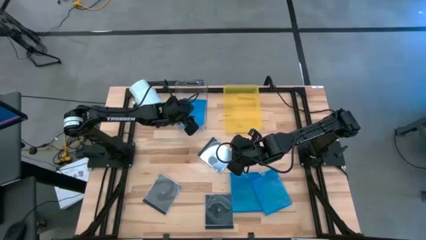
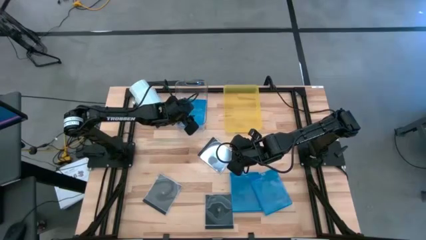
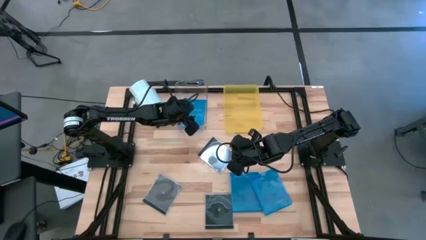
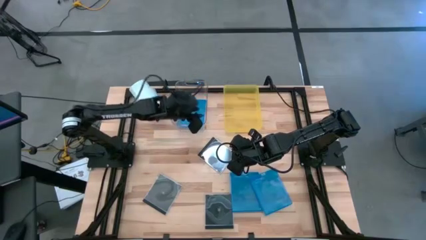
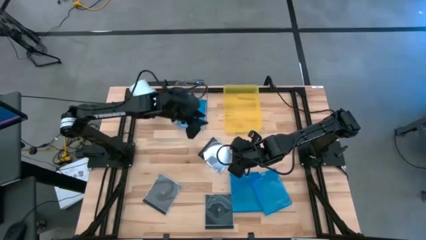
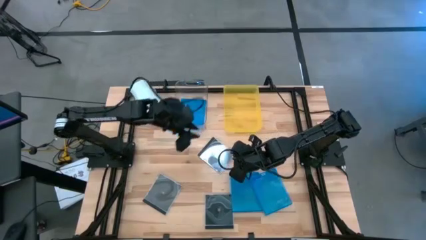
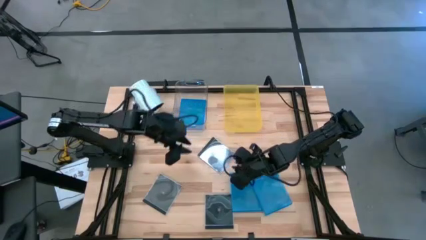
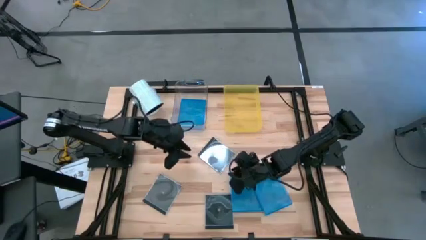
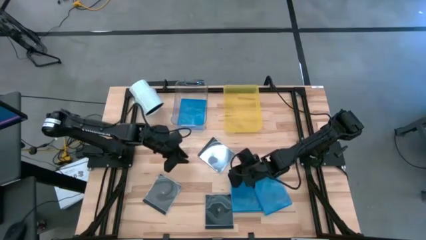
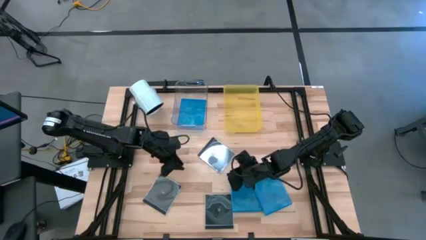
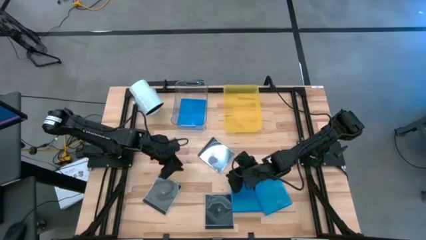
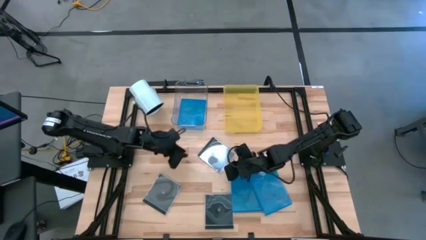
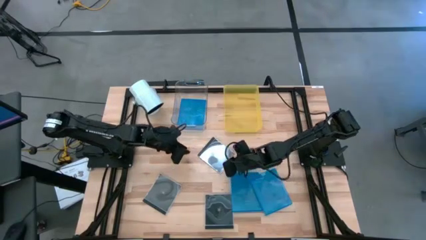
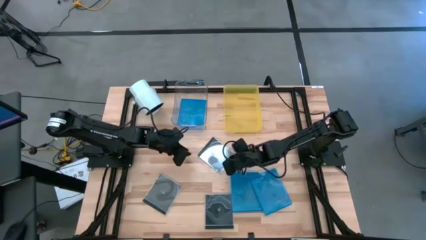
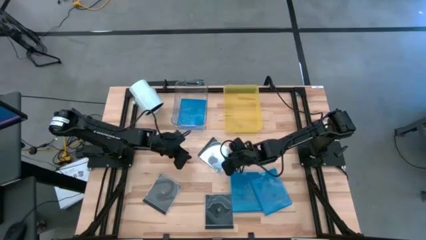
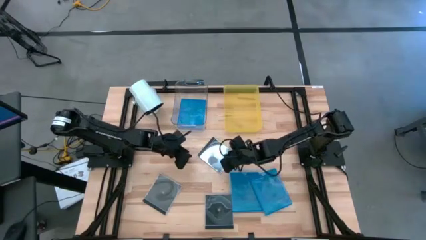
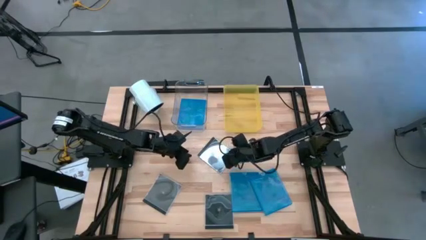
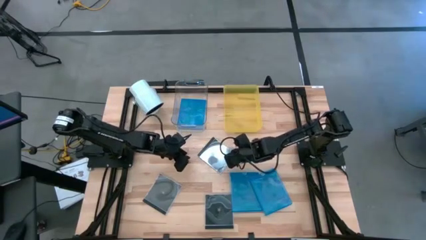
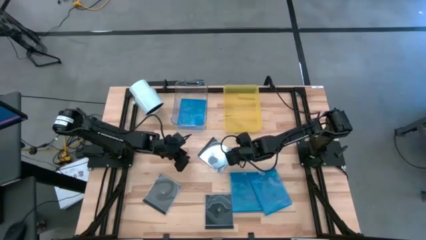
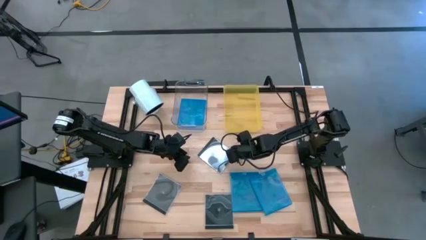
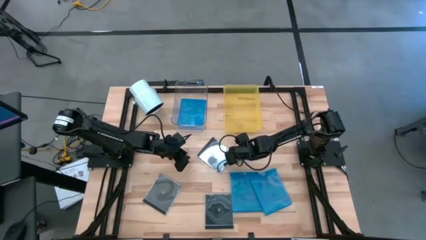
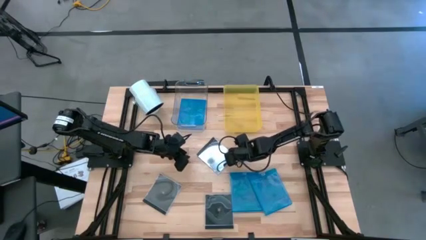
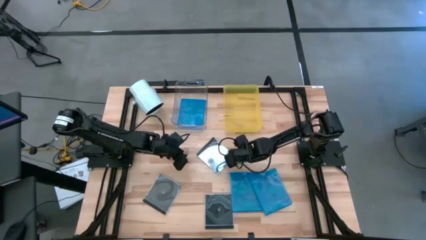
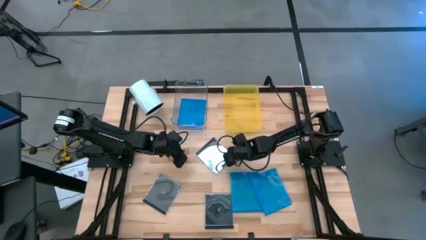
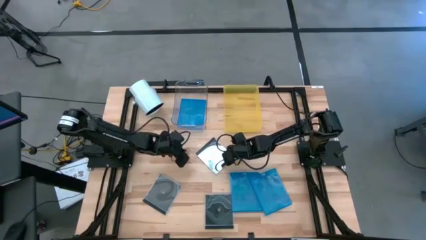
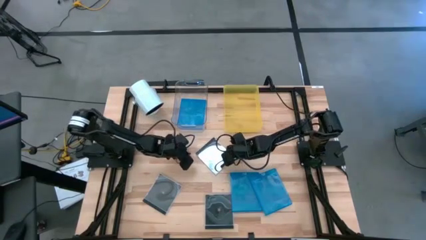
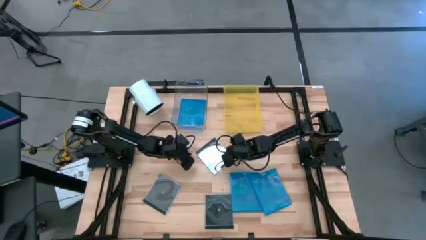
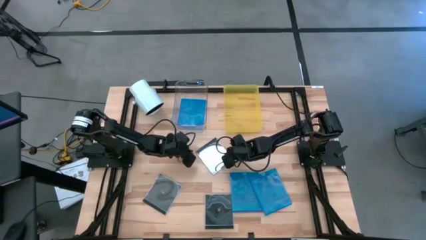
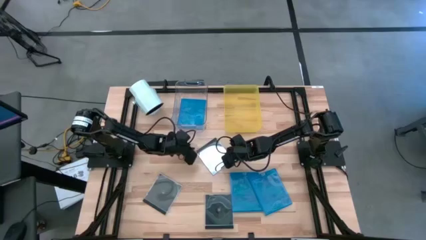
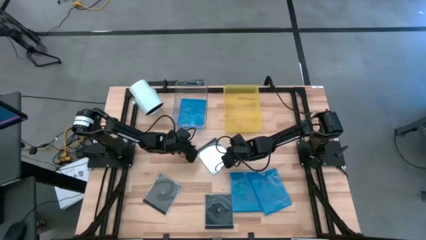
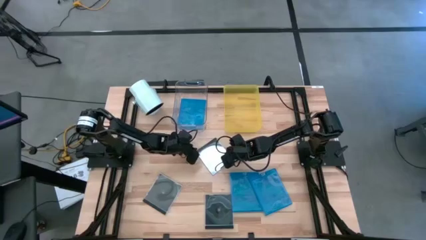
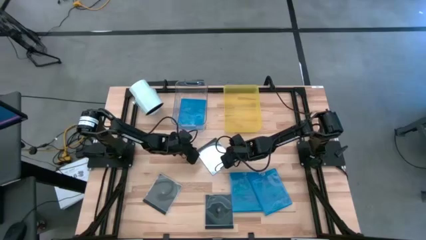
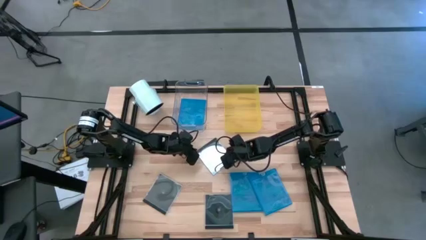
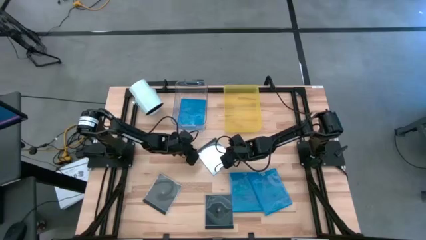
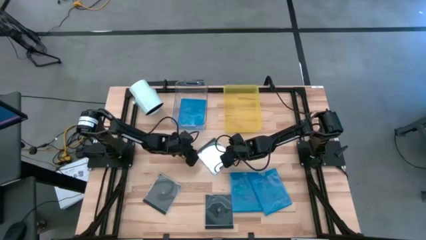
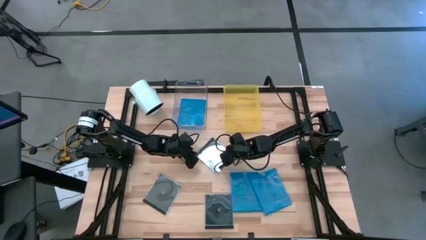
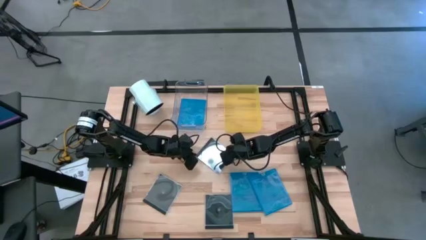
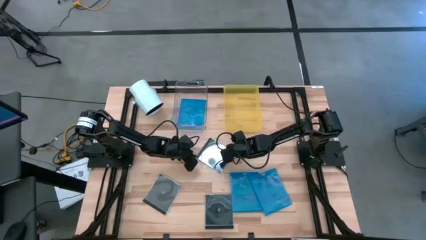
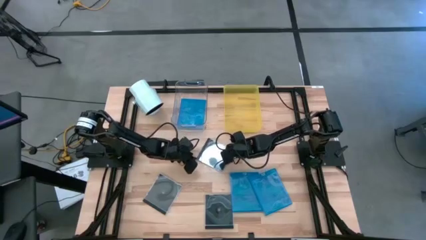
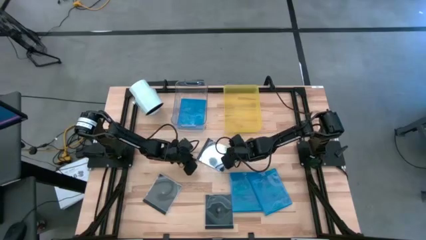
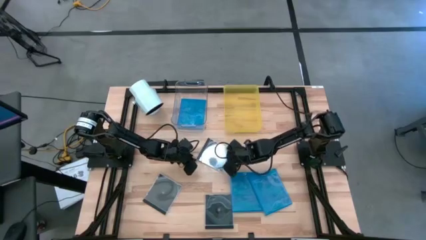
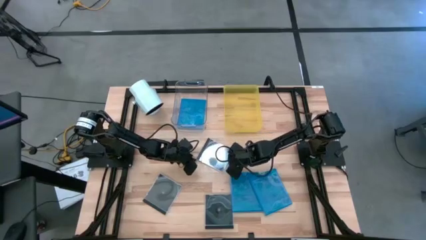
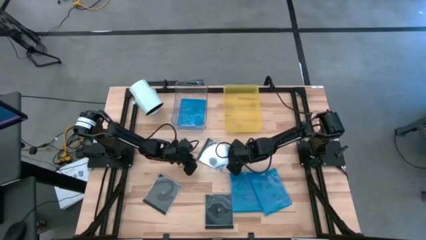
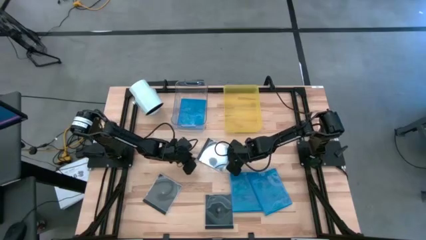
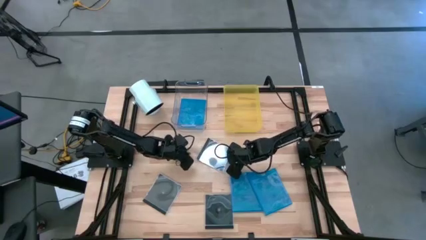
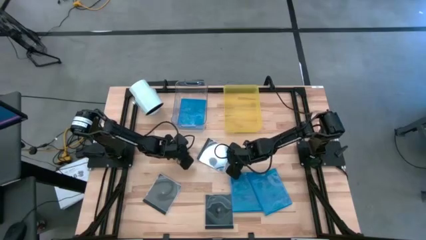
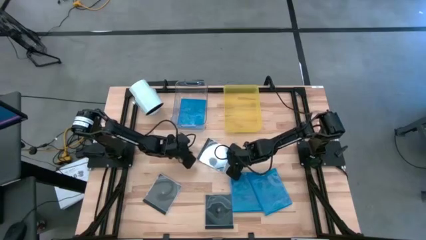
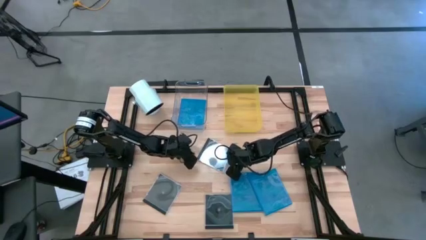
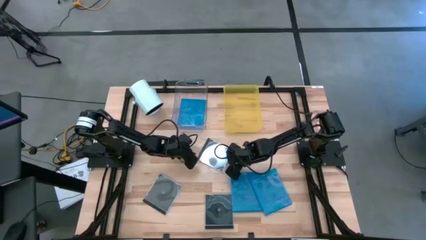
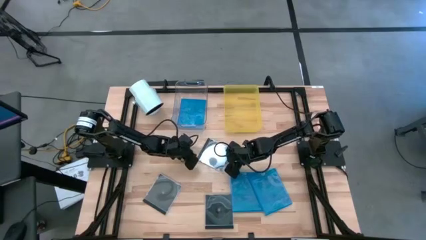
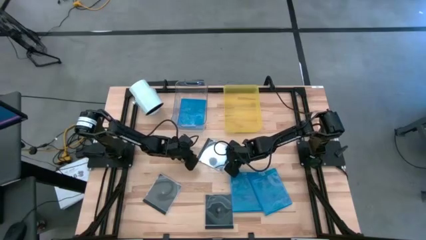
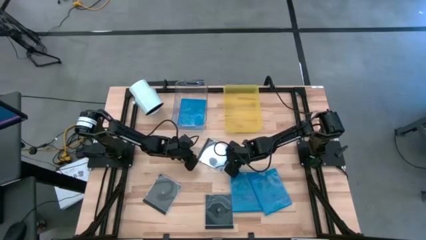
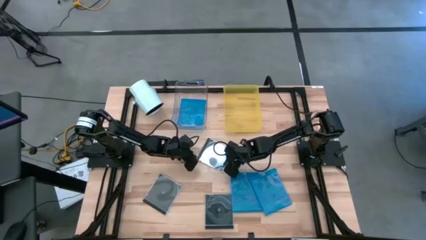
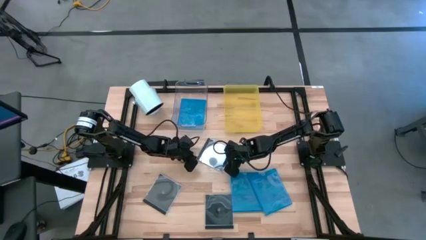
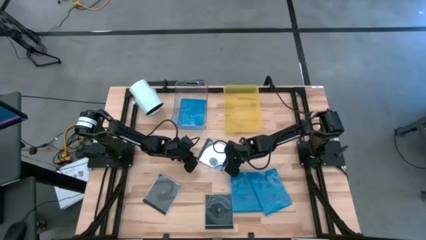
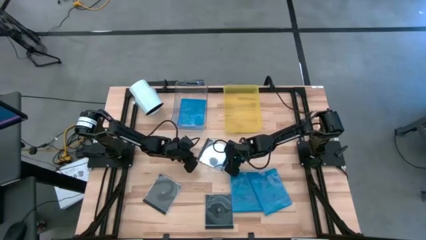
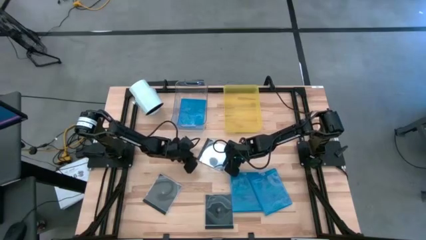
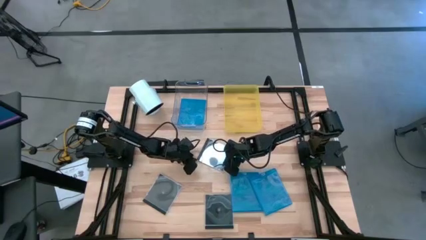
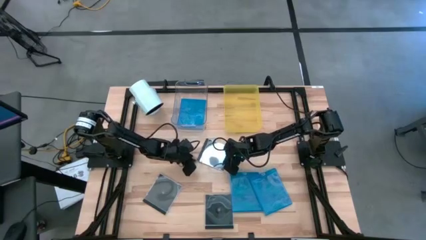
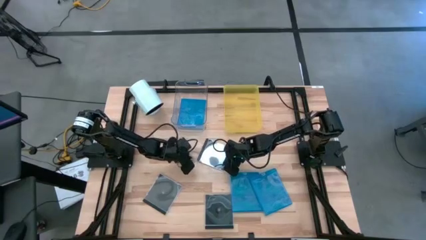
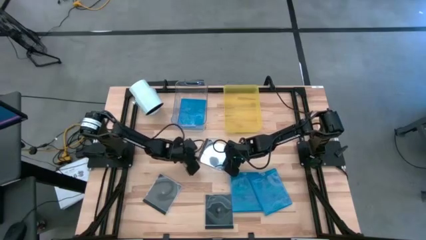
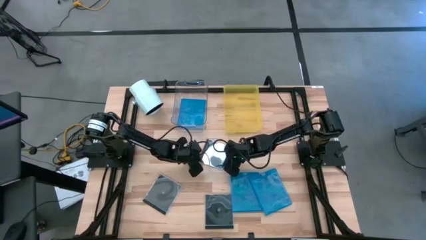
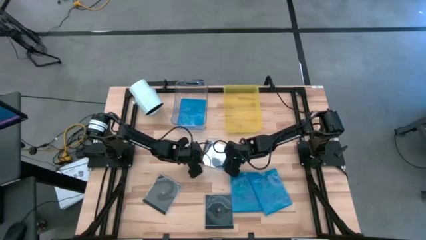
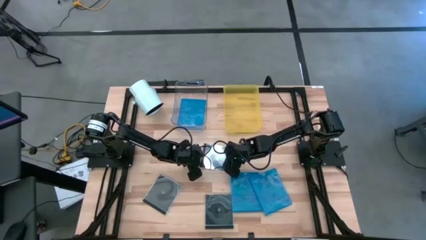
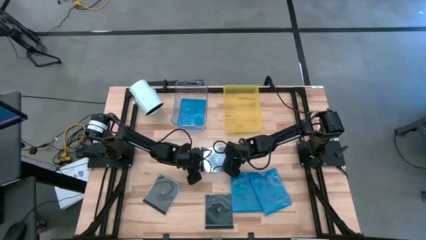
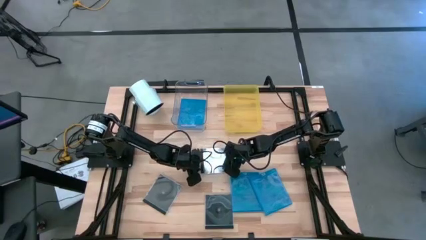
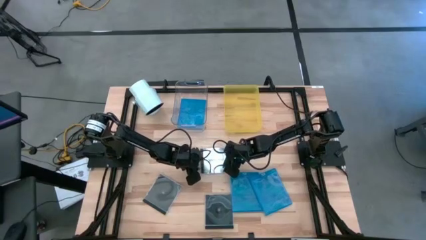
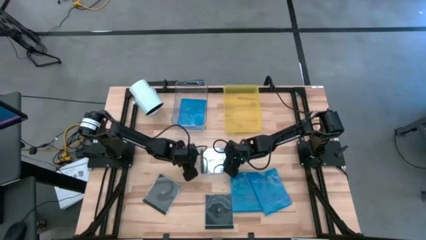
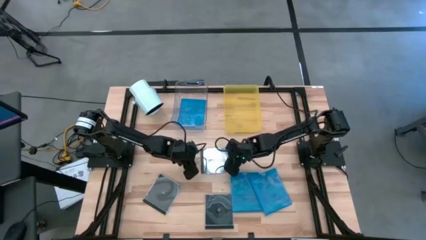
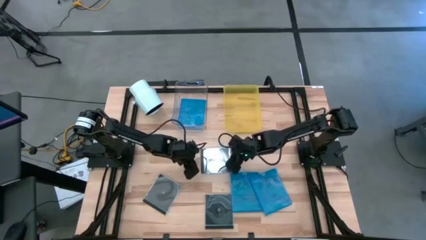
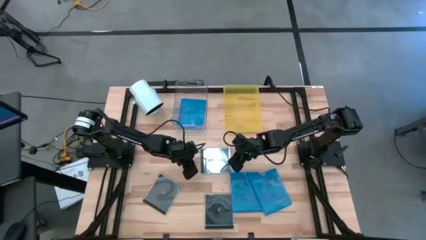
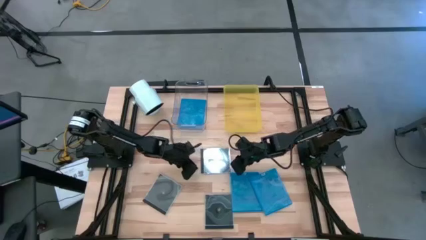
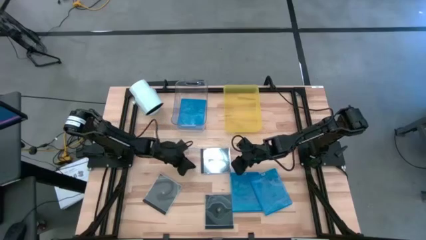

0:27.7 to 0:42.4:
Task: Pick & place jewel cases by type
Put the top right black CD case into the yellow bin
